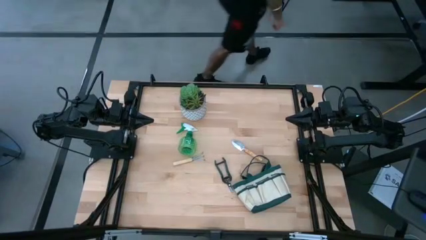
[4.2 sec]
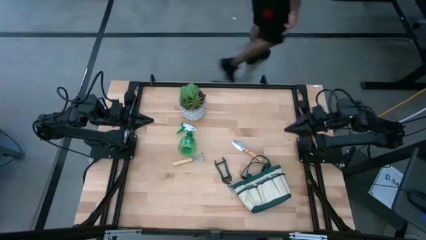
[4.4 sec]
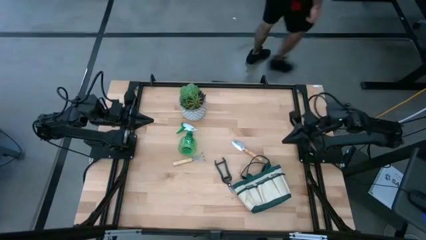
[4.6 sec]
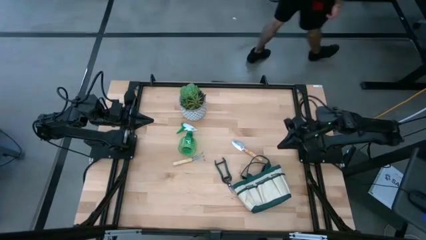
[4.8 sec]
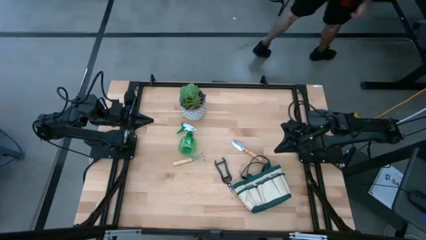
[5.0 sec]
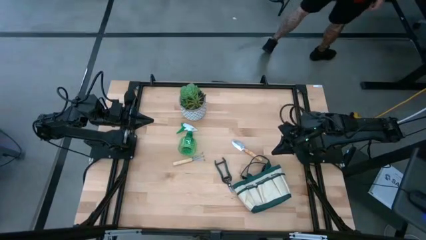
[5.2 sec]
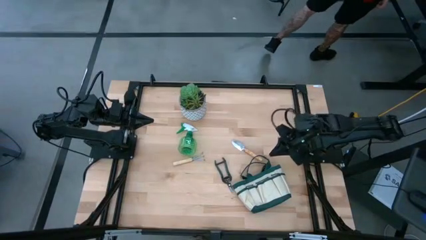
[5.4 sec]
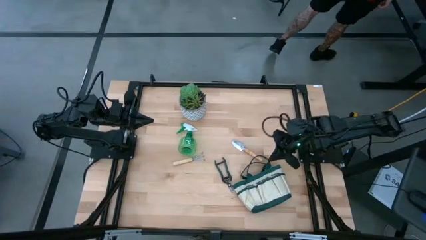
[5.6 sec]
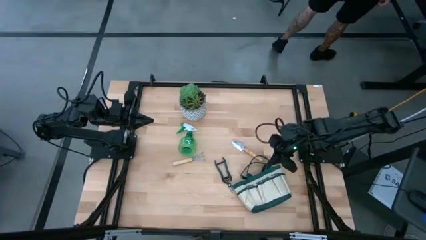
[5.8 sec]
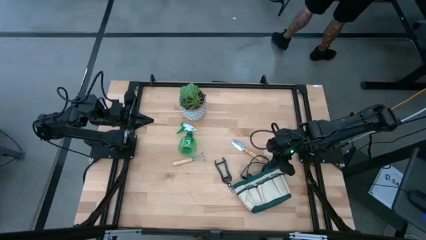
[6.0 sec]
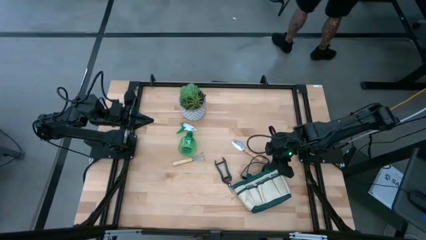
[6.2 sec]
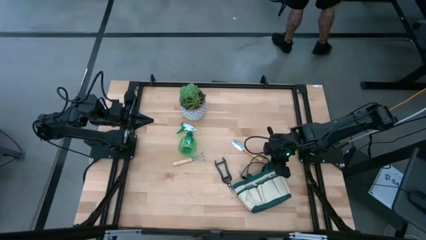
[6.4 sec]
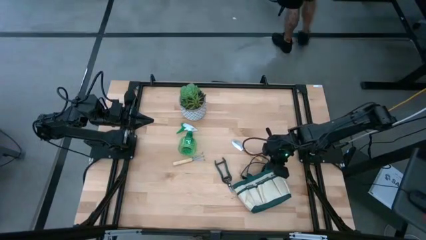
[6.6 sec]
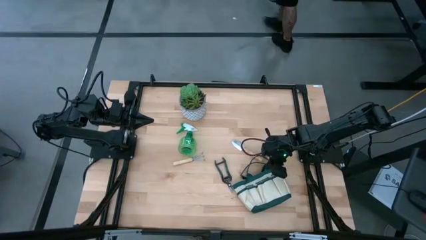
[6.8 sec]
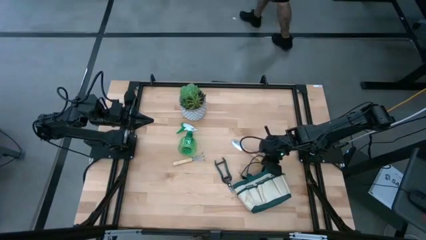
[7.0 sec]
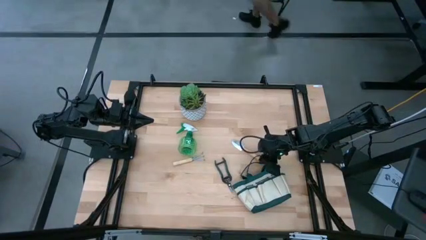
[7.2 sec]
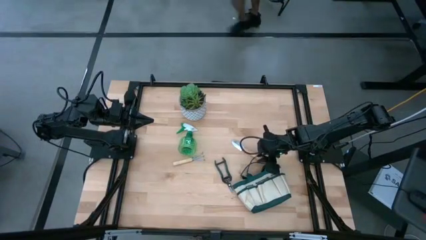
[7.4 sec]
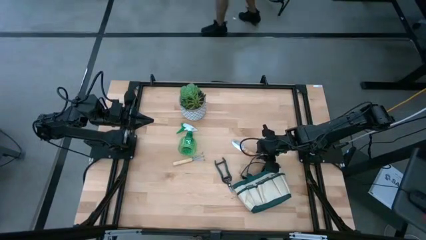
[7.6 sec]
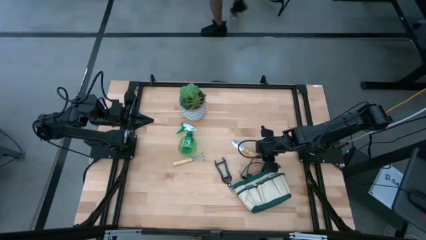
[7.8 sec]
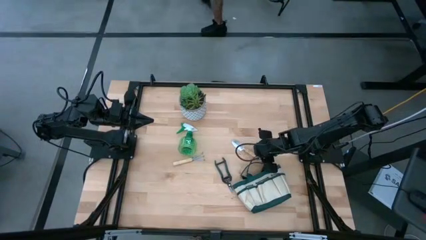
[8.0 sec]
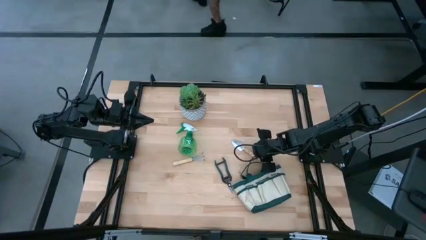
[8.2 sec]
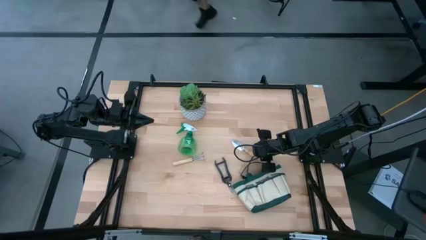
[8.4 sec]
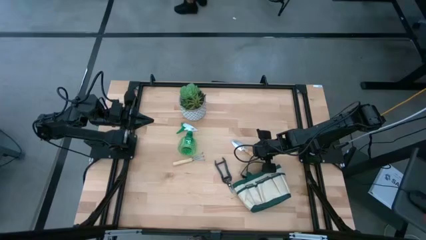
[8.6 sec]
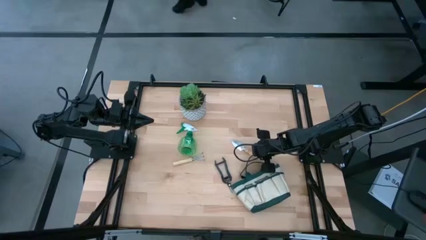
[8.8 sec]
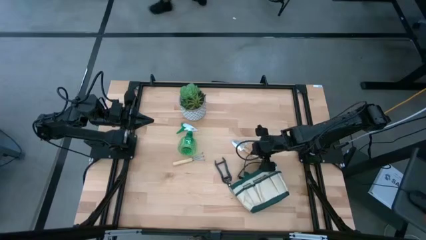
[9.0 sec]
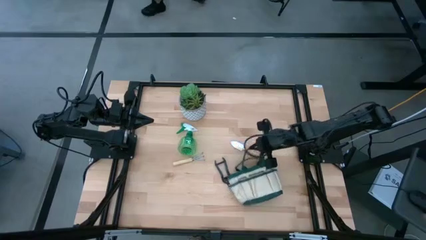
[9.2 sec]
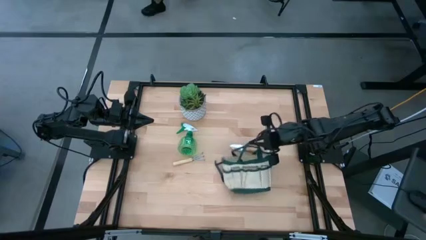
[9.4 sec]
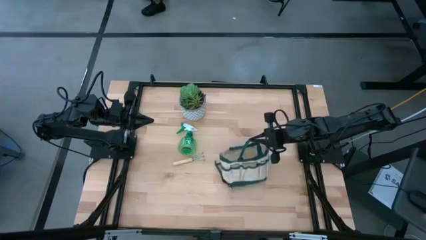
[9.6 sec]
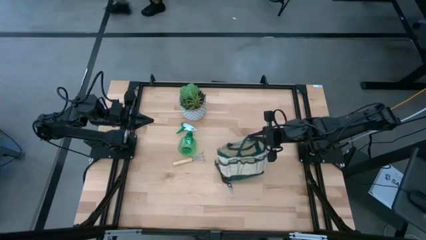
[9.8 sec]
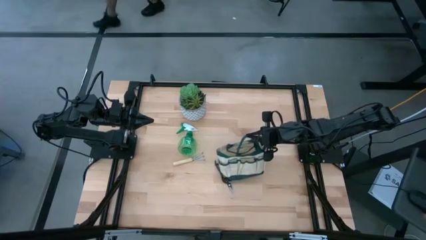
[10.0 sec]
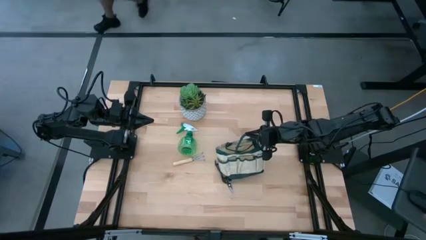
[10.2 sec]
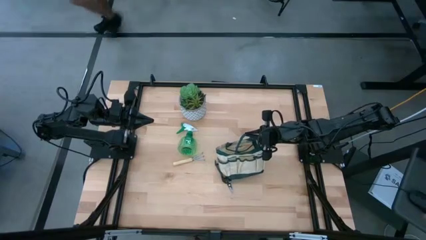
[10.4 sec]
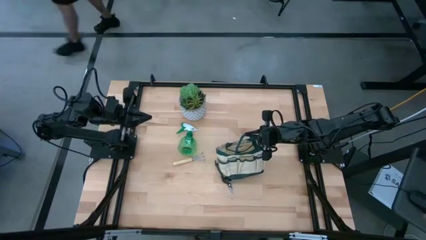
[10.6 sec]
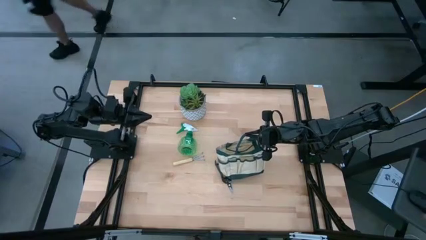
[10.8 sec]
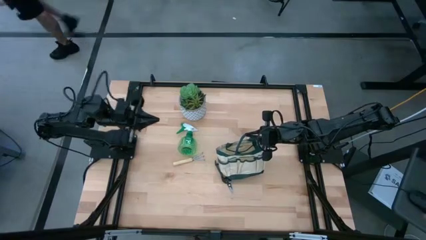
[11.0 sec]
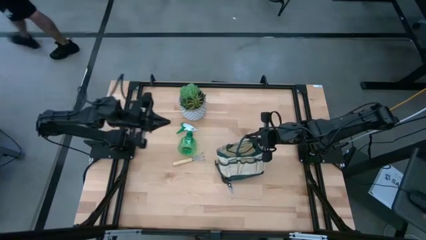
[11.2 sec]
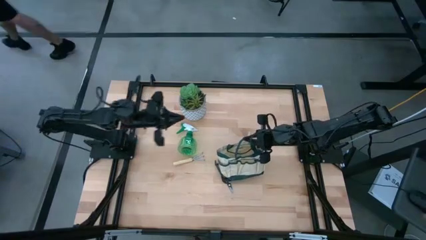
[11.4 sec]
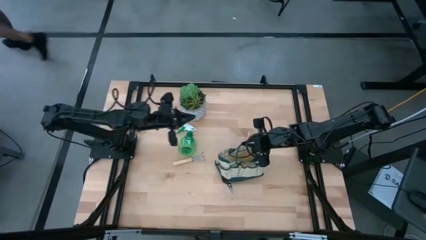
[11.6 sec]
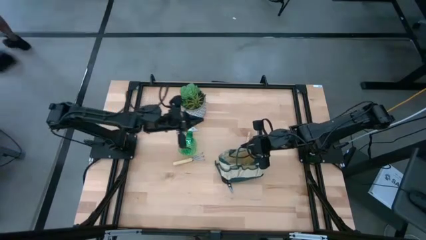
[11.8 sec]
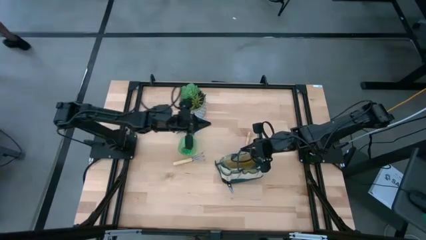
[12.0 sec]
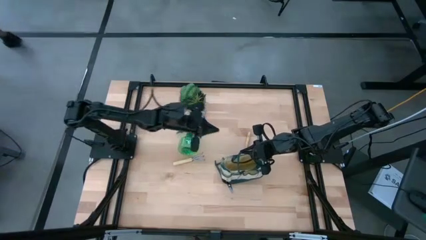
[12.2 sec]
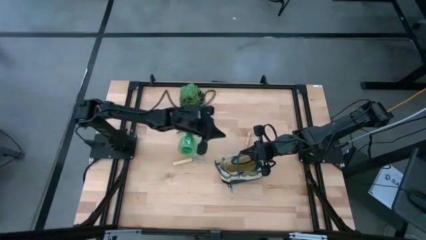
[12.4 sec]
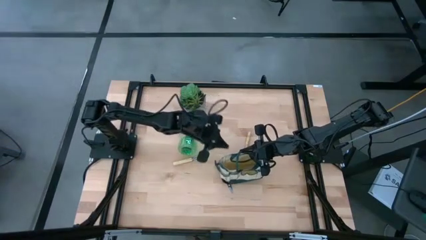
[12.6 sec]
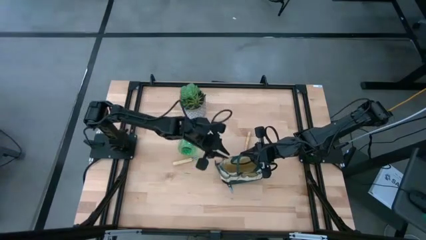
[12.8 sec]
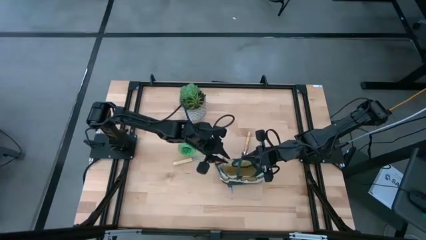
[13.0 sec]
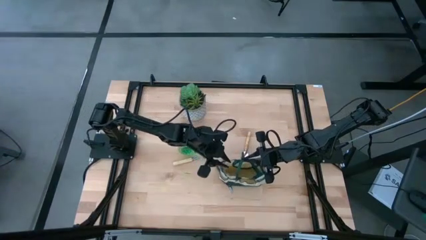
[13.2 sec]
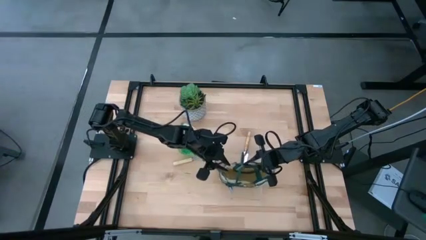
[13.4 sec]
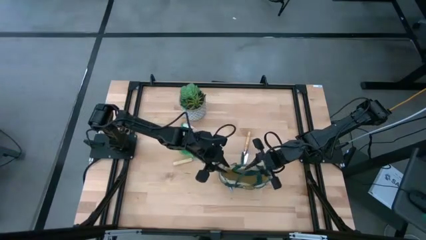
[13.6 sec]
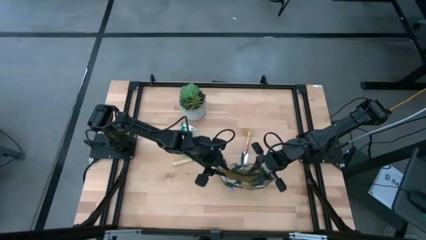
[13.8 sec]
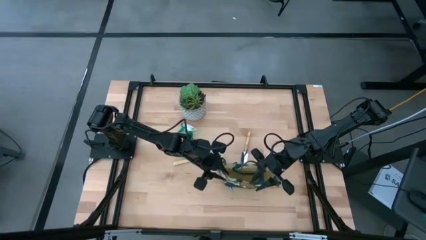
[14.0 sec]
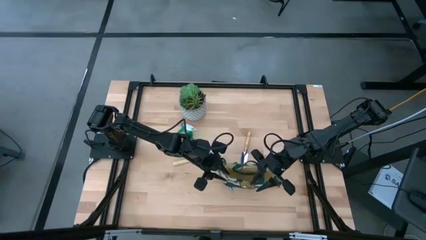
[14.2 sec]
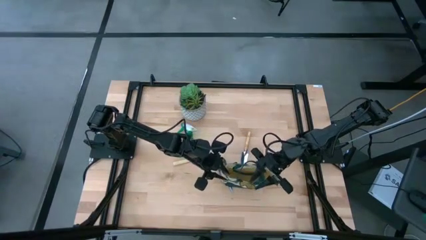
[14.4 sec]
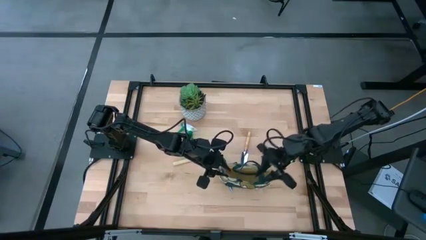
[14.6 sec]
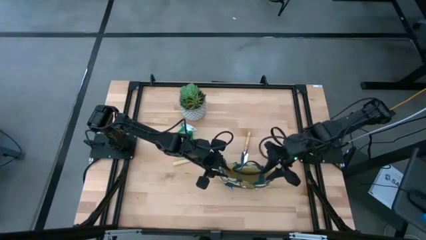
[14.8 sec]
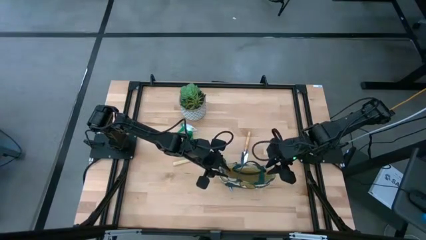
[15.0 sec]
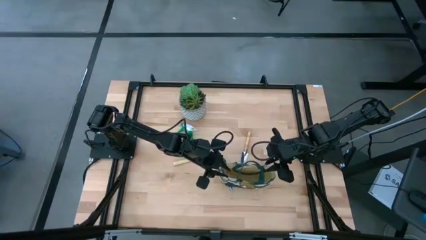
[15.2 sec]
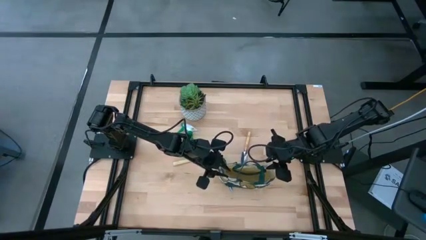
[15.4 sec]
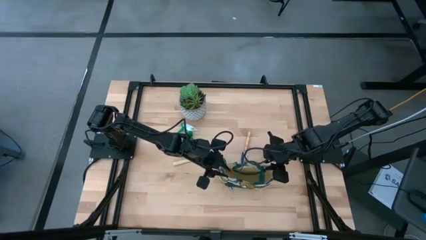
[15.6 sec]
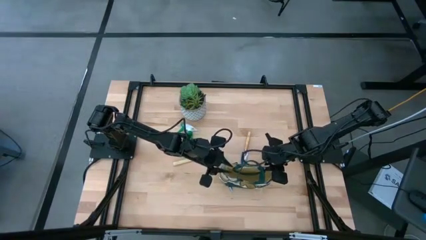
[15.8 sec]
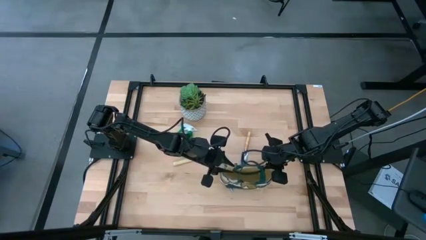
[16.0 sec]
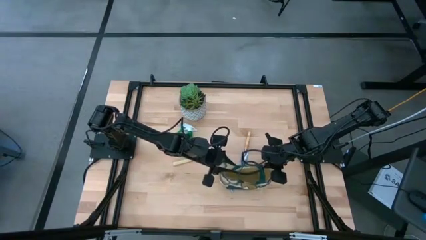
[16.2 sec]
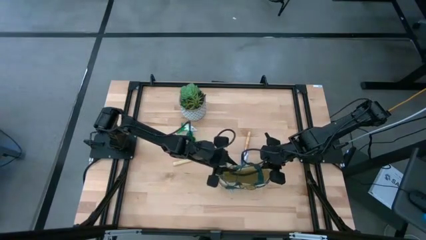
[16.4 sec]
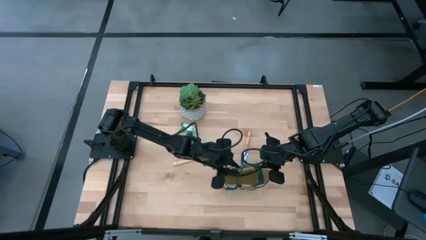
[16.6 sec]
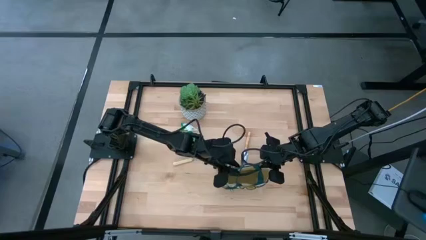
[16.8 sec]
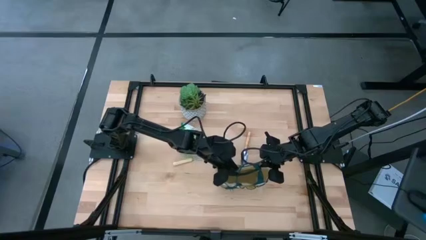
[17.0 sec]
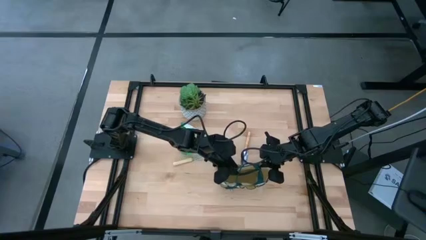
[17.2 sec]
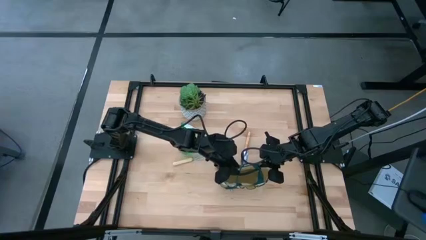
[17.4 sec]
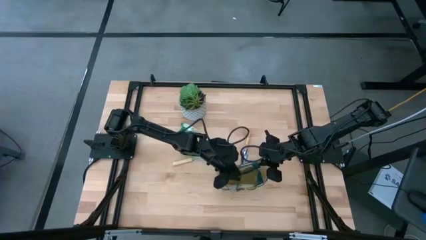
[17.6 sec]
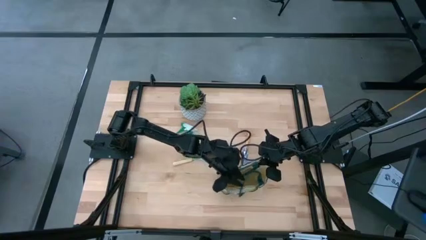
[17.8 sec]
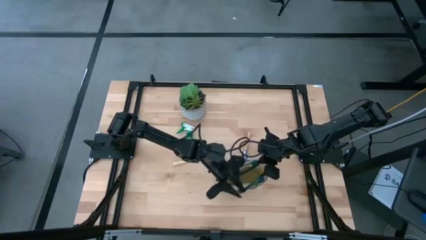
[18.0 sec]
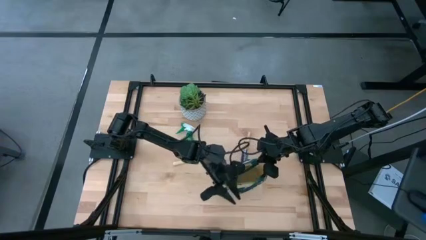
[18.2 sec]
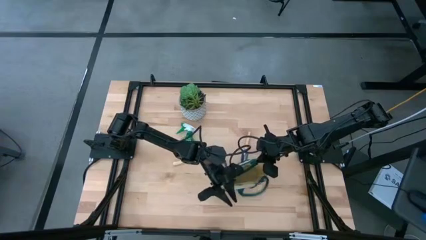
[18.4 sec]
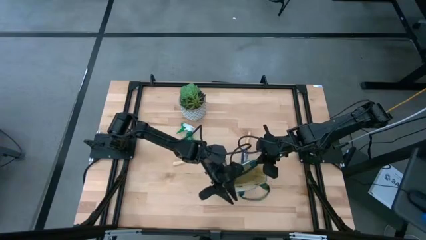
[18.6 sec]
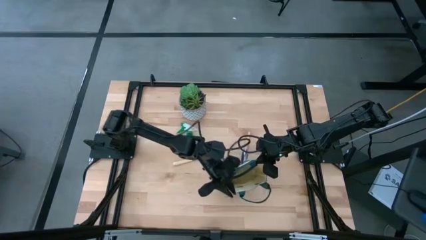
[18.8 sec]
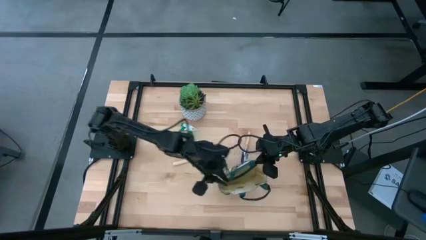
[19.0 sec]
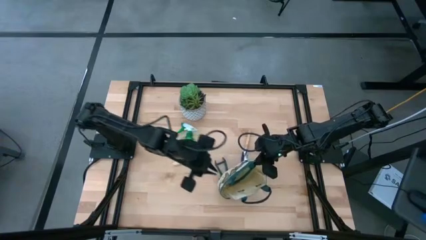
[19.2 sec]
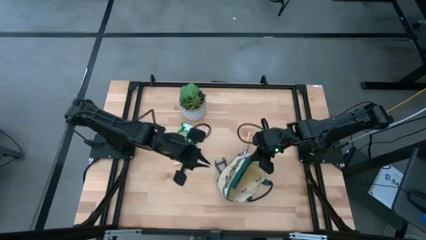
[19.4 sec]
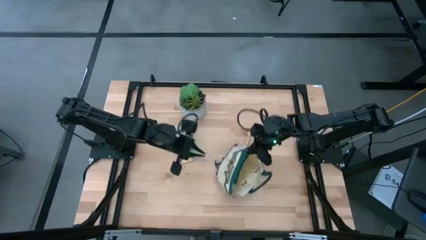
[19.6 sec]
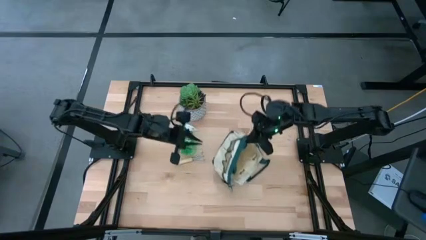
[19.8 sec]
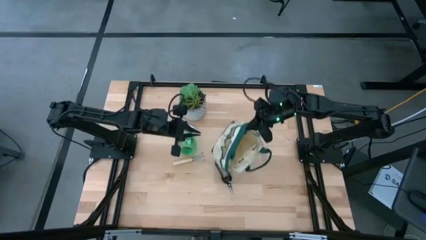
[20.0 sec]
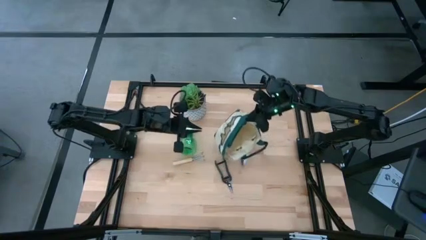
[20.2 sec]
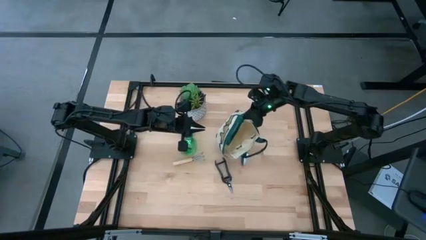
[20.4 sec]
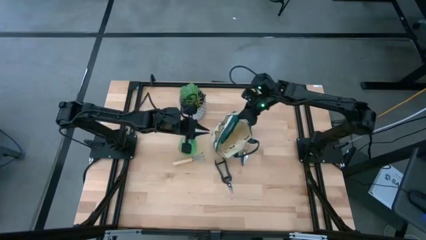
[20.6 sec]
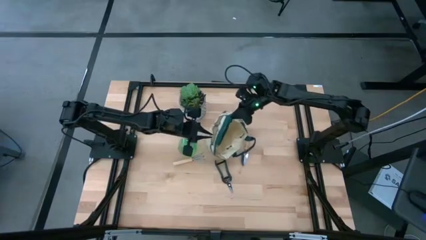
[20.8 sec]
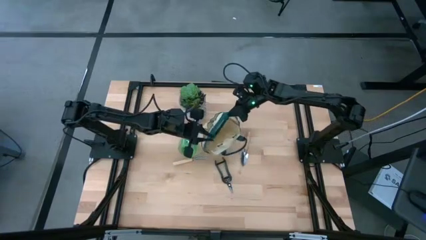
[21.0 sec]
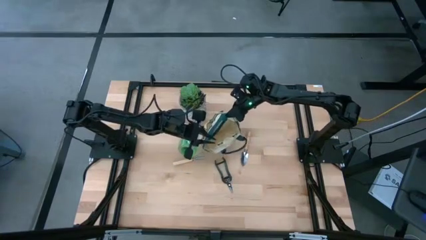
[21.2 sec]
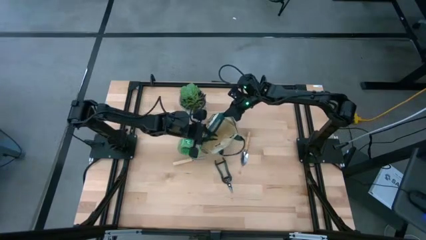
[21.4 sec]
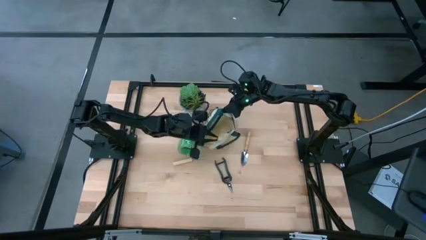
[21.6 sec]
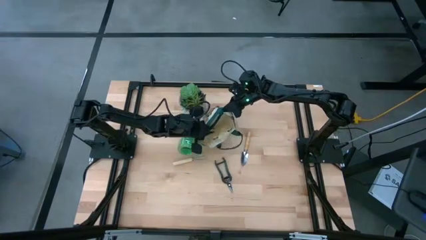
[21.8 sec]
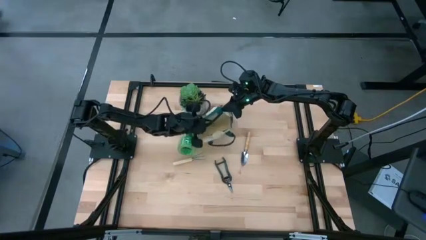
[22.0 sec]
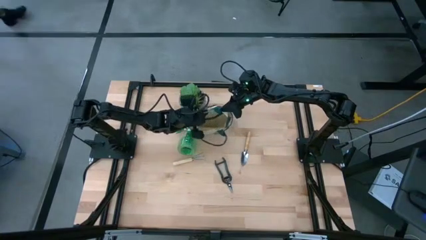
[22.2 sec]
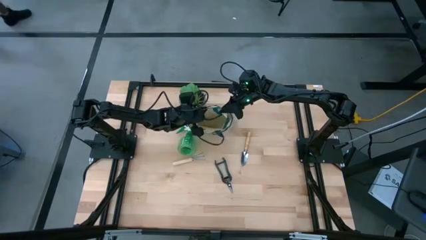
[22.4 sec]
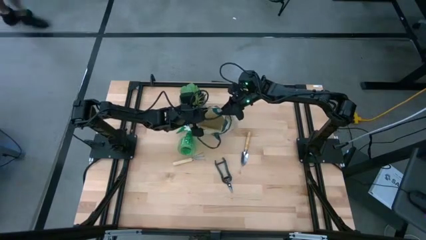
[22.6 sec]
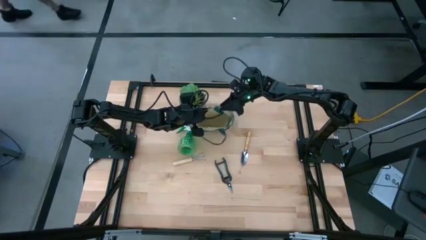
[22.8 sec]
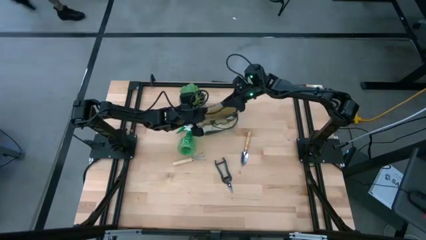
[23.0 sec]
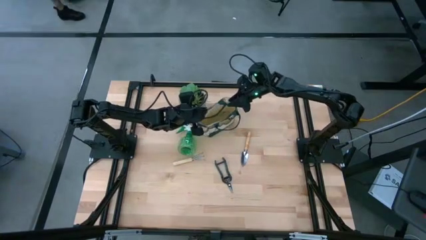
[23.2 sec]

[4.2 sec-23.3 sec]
Task: Pick & Place Garden tools in Gardening bag
Prepare the white gardening bag
